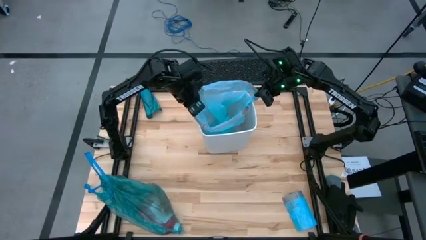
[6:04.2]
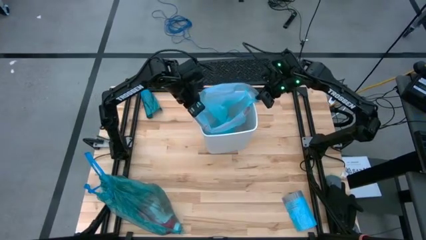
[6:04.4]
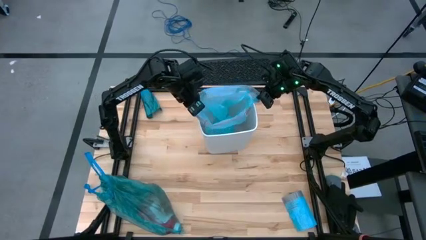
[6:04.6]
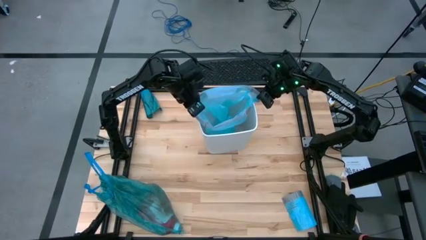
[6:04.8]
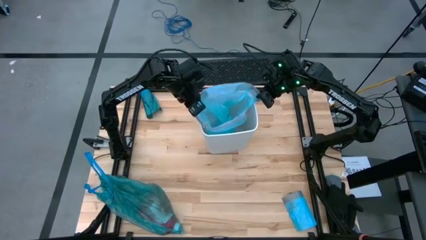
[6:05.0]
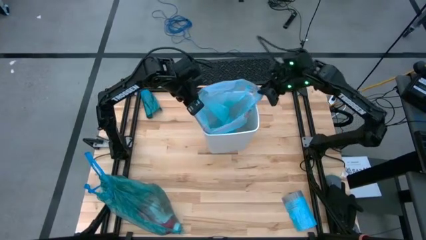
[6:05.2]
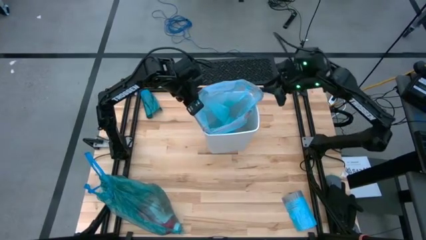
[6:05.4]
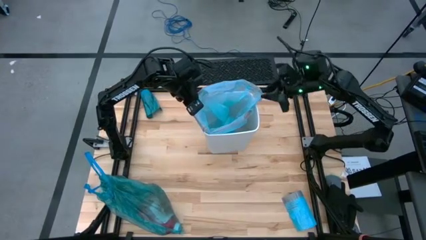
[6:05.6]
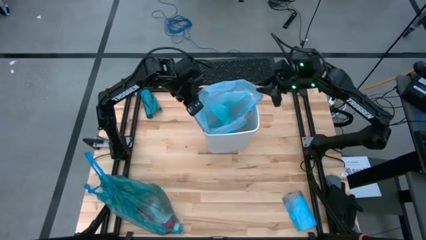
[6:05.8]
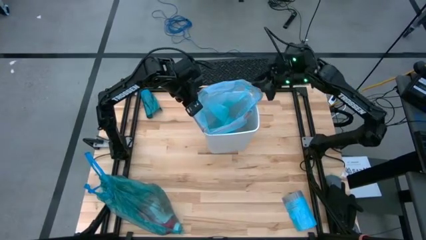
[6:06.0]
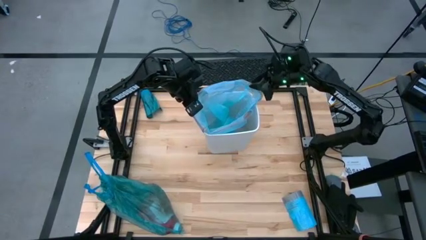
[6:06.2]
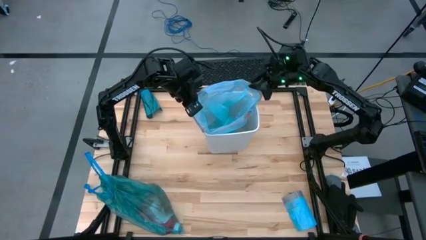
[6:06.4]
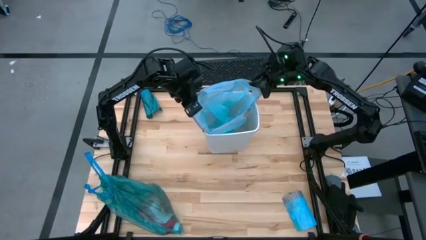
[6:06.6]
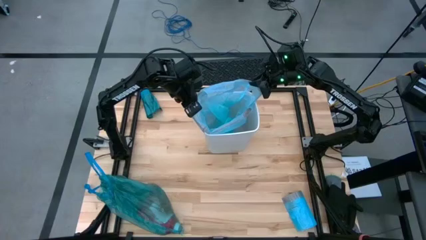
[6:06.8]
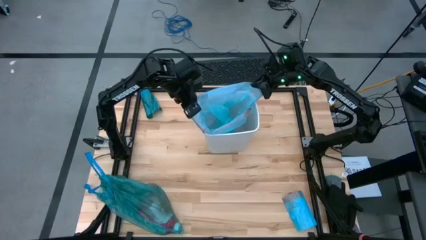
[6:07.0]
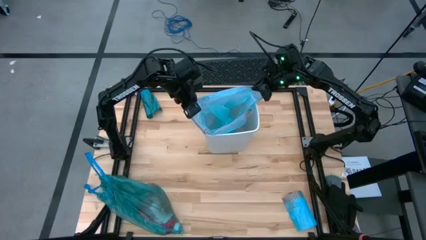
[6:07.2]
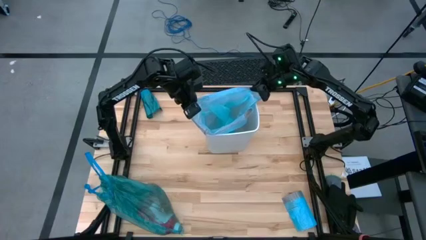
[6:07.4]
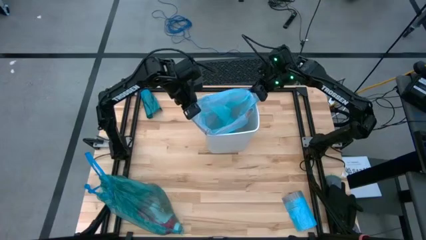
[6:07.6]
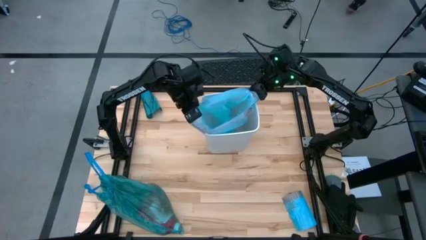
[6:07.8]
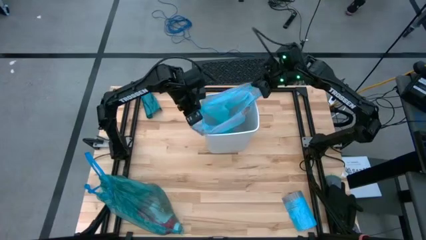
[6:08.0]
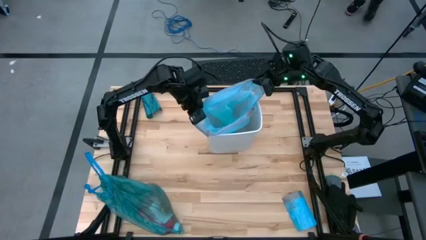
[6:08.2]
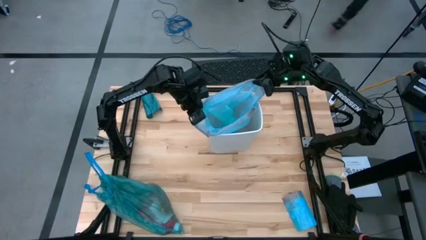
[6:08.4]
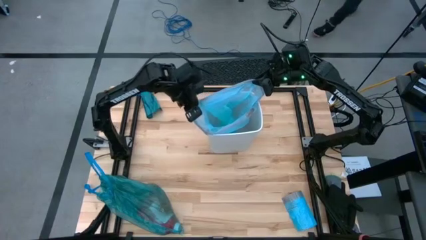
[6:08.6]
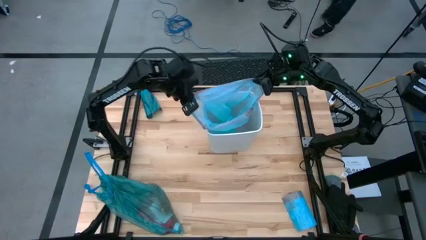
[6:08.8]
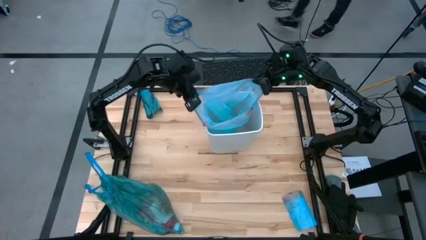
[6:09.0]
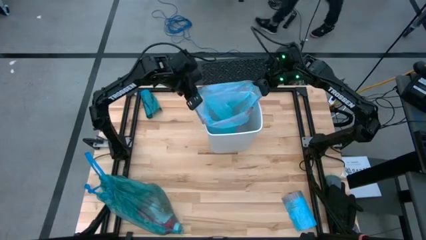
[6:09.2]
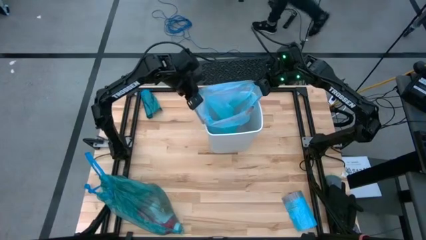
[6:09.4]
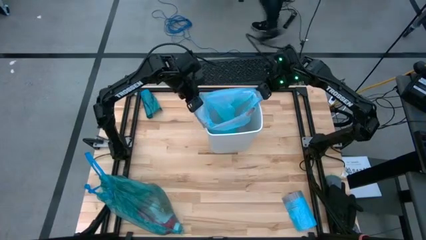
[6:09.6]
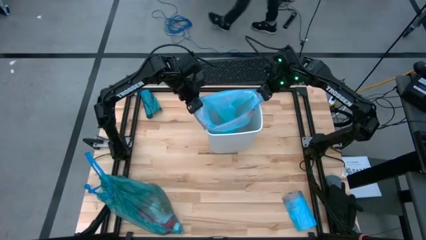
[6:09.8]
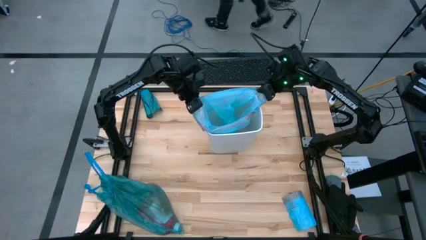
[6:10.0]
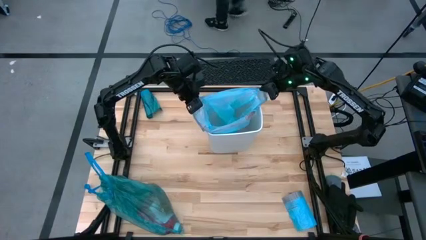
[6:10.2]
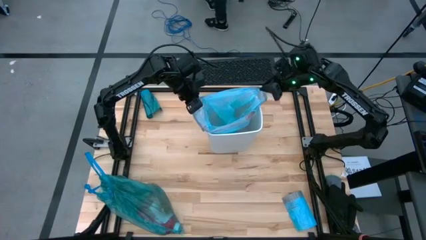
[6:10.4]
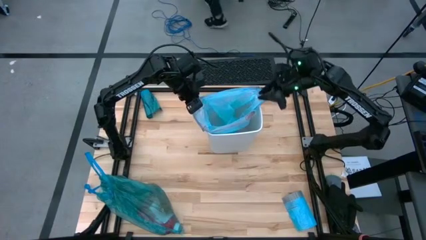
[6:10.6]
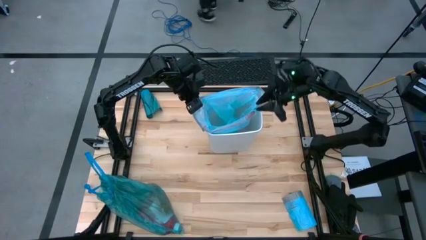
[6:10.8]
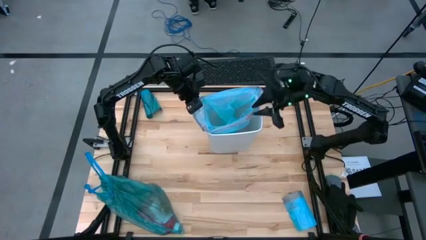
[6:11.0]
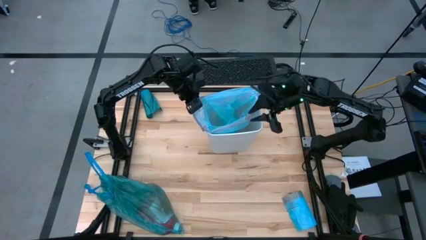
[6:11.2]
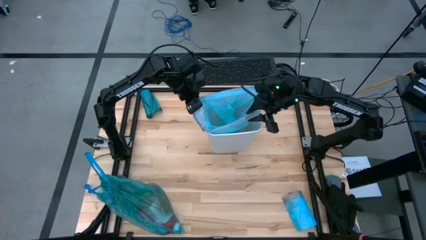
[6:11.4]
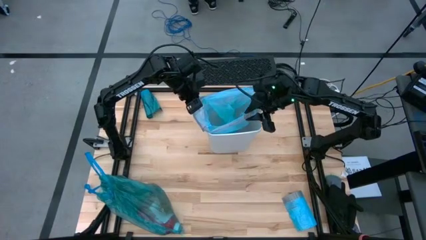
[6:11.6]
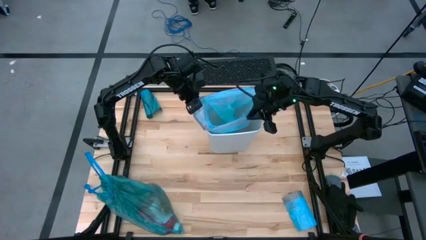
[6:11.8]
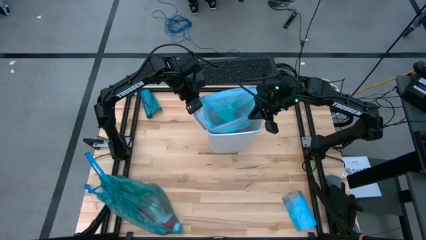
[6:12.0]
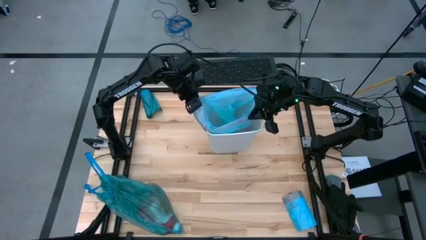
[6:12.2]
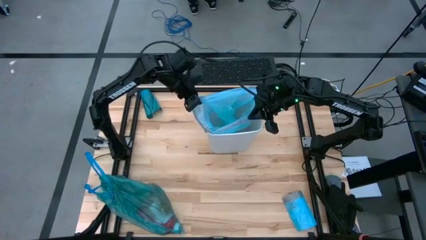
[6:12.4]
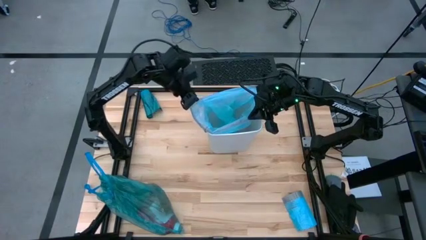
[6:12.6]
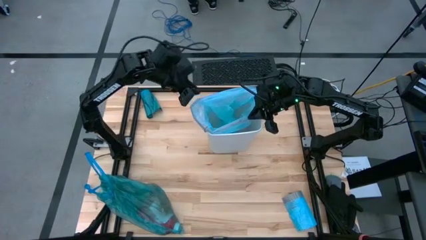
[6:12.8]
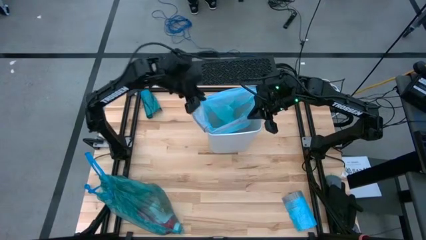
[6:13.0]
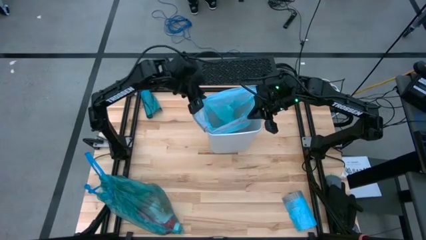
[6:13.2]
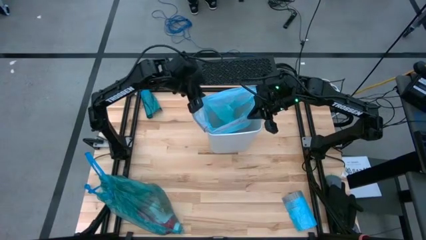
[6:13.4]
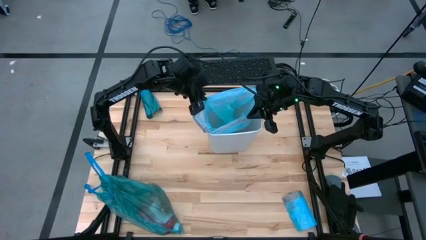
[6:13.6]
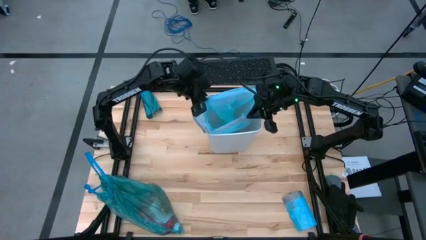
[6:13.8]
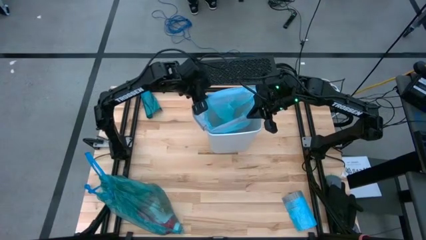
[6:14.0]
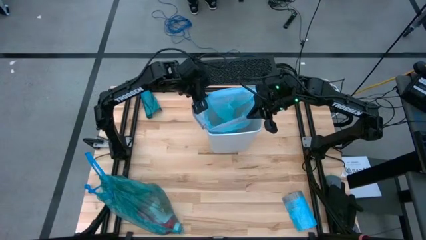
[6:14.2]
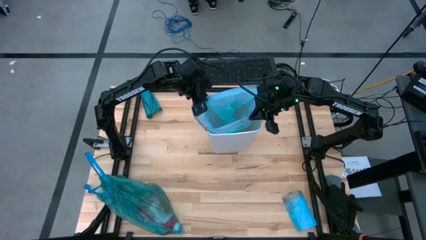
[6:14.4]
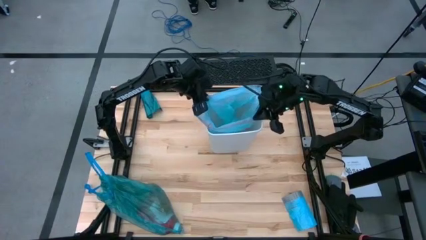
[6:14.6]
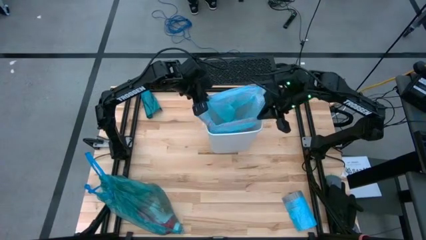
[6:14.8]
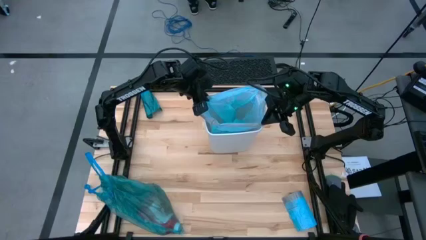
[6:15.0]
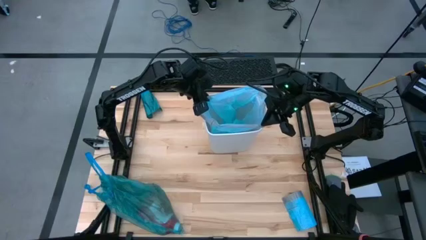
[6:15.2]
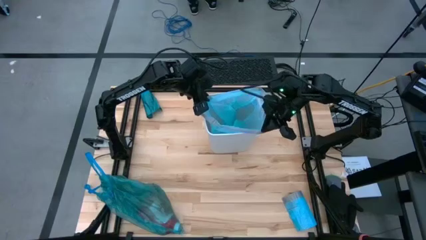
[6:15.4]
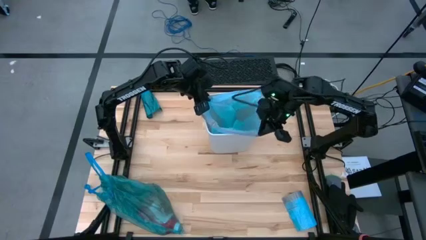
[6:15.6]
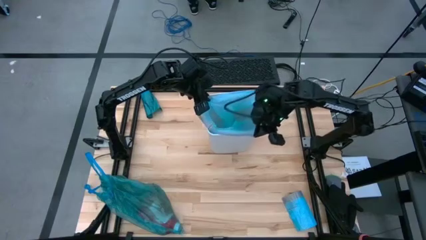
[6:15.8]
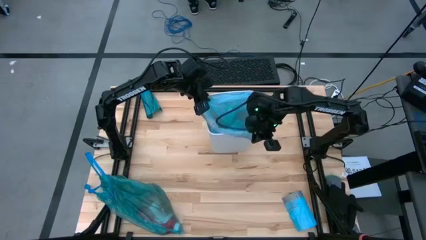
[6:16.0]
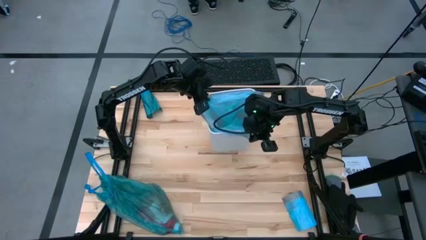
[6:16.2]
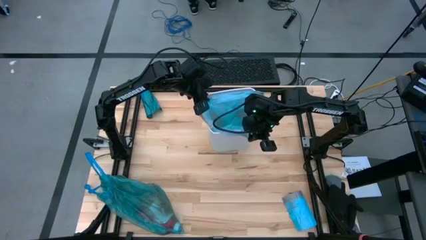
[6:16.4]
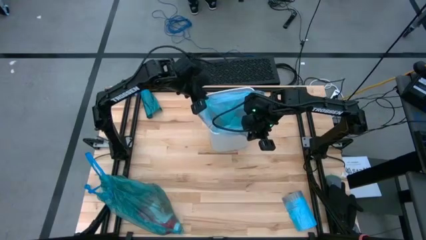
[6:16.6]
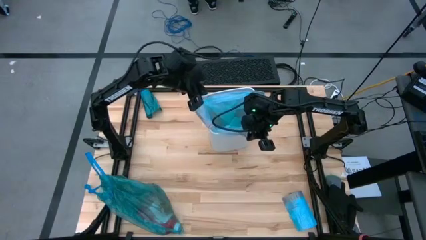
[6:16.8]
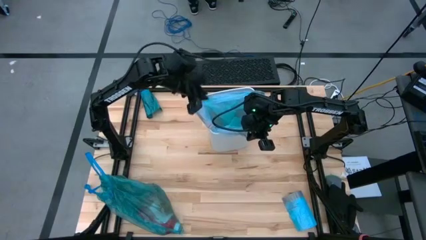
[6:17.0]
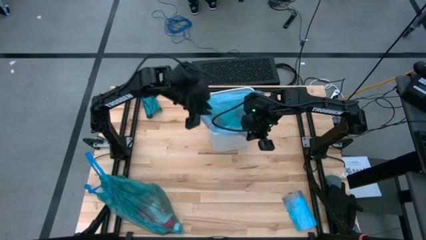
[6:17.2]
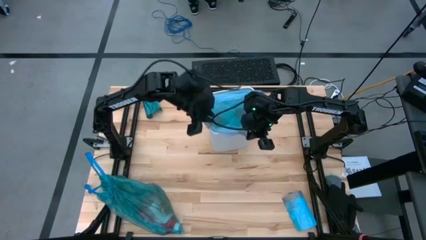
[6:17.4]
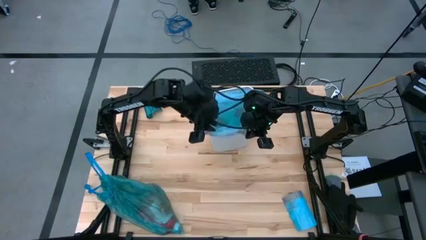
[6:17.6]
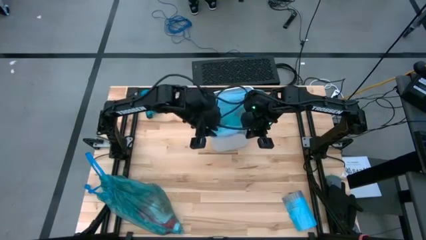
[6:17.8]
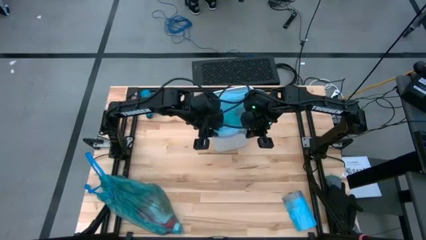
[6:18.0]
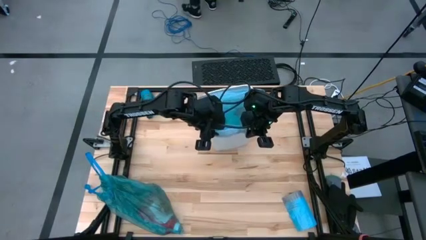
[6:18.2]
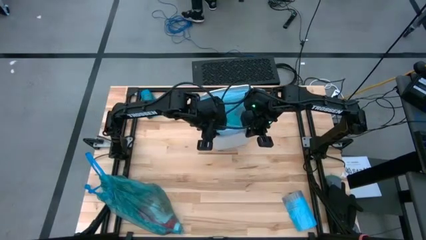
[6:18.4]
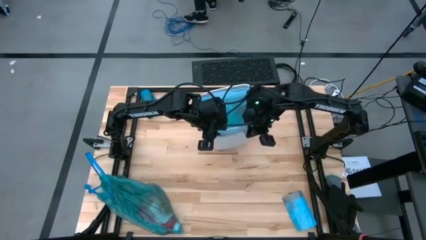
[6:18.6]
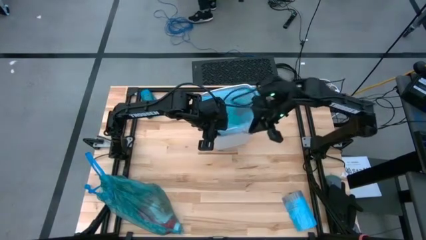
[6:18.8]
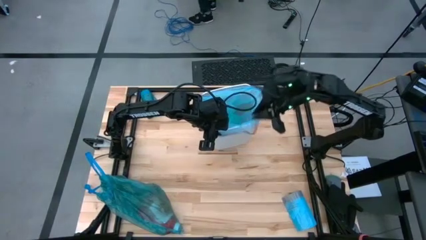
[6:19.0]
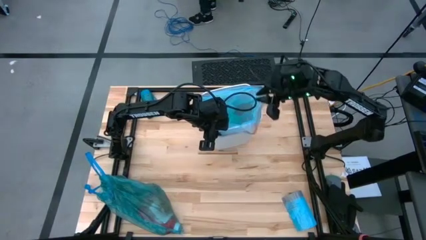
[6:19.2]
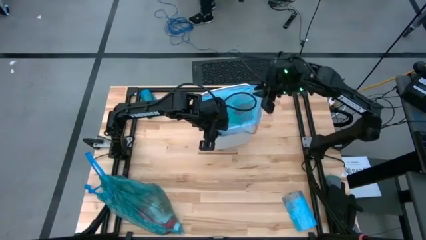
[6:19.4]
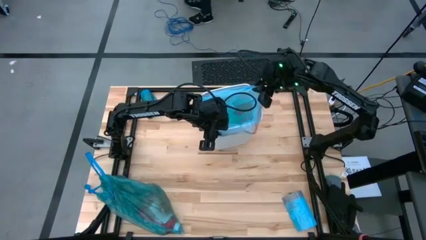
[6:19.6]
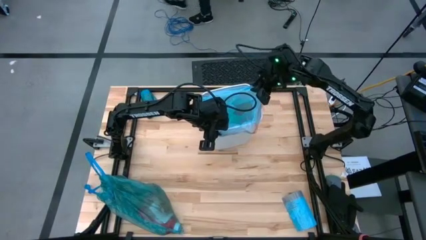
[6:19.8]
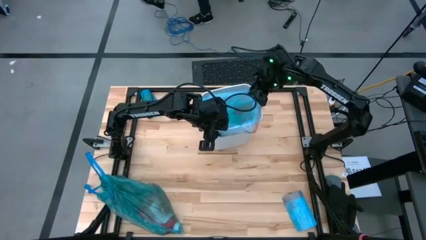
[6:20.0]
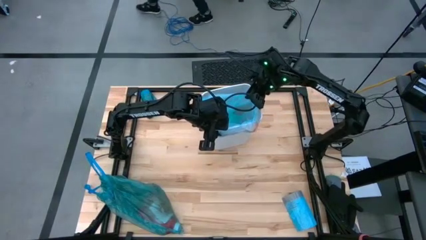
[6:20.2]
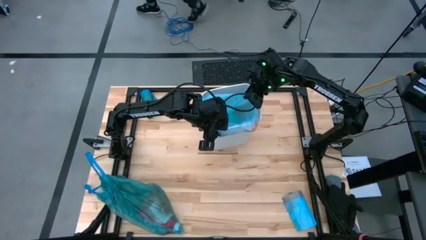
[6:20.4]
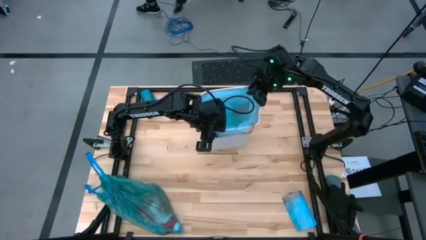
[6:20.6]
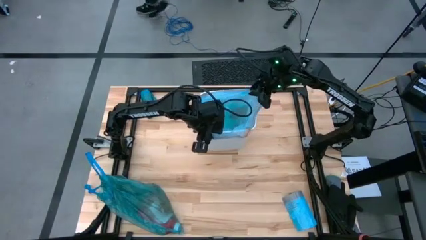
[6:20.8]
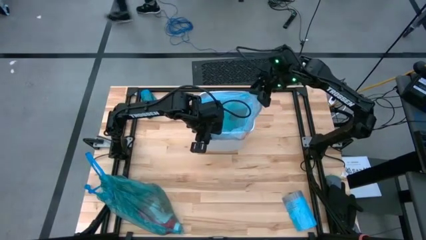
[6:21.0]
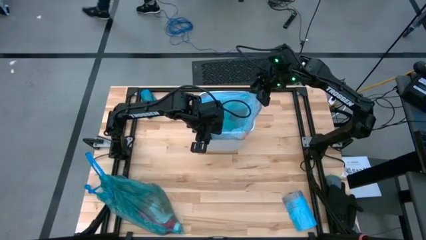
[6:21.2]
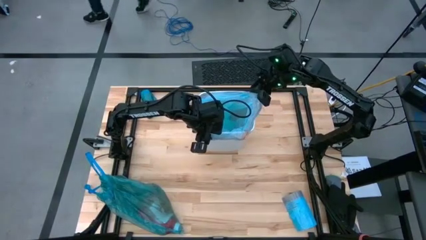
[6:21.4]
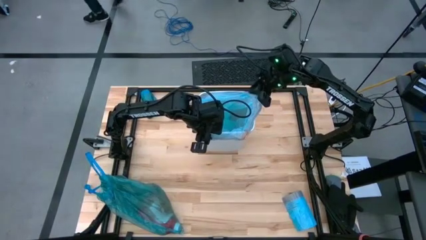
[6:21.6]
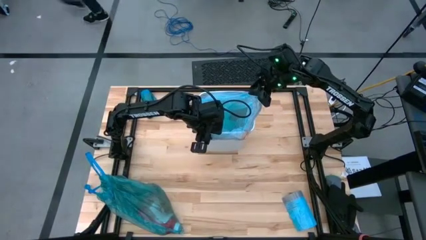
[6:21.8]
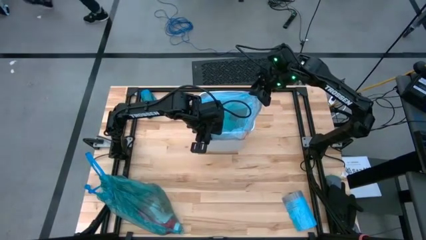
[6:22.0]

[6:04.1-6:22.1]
Task: place trash/remove bag and relplace
Insert the new blue trash bag into the white trash bin
